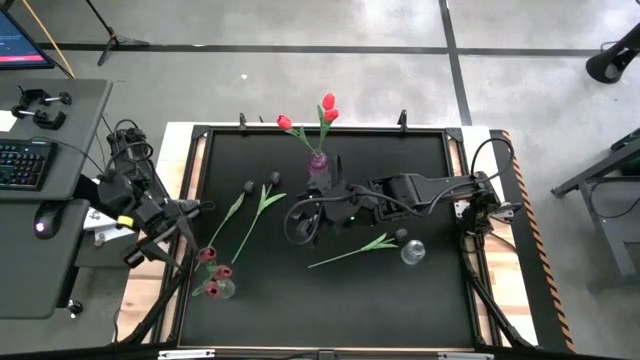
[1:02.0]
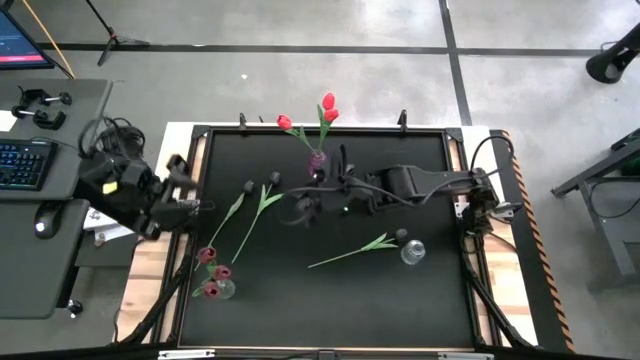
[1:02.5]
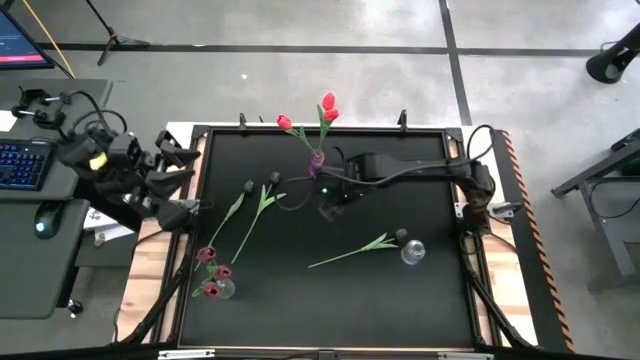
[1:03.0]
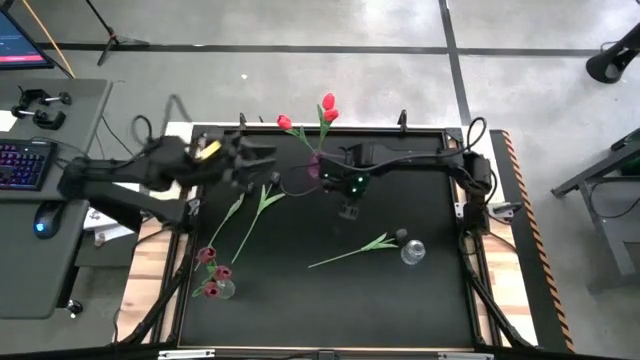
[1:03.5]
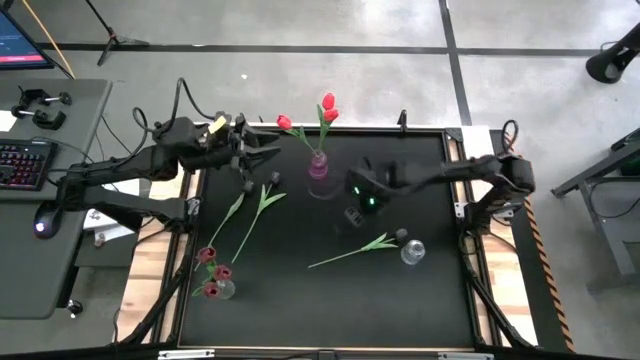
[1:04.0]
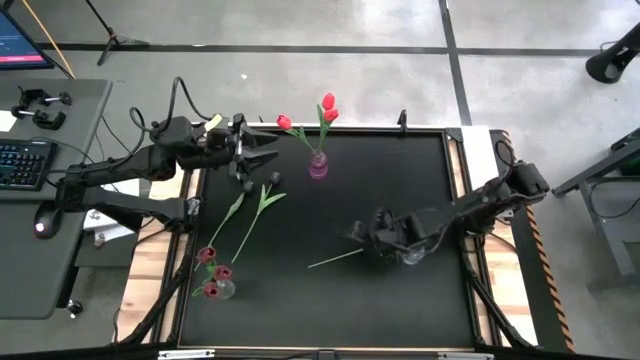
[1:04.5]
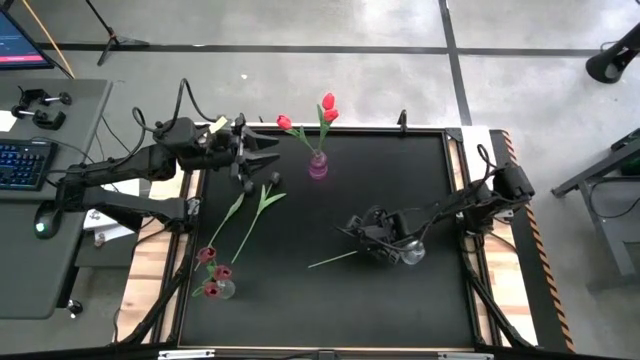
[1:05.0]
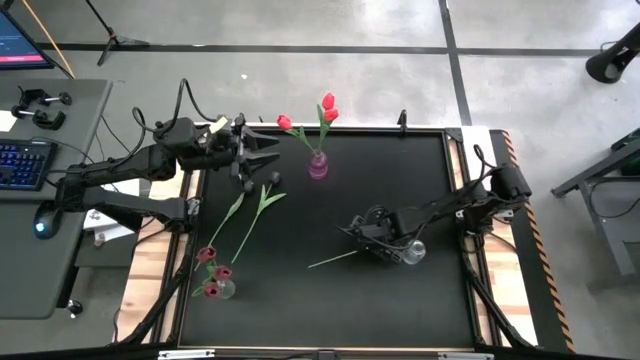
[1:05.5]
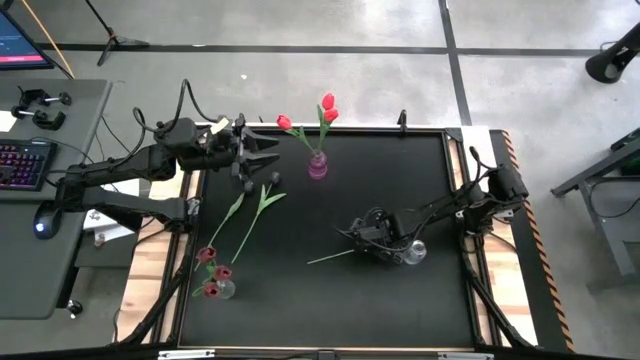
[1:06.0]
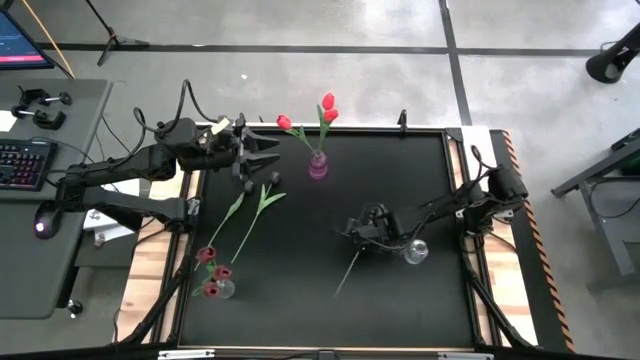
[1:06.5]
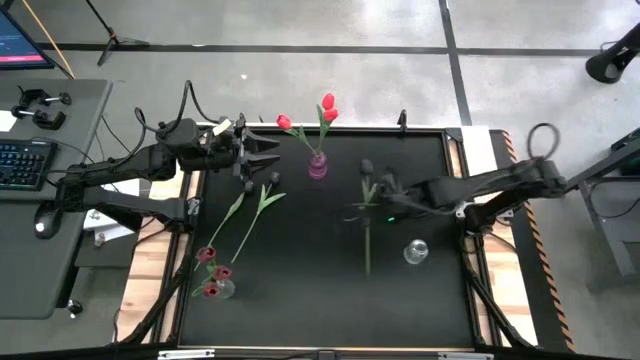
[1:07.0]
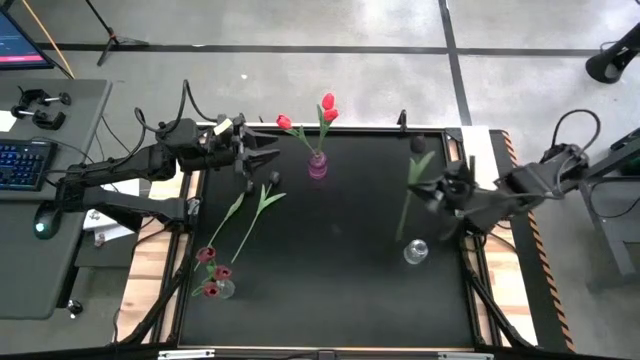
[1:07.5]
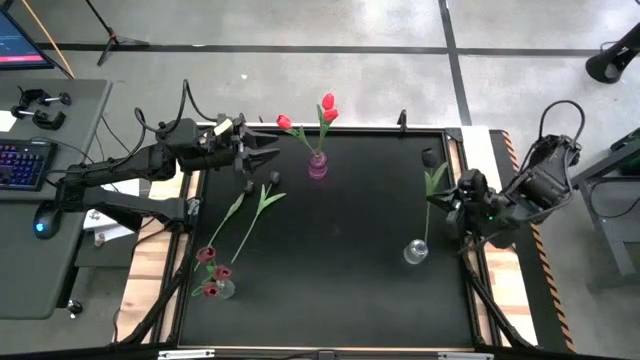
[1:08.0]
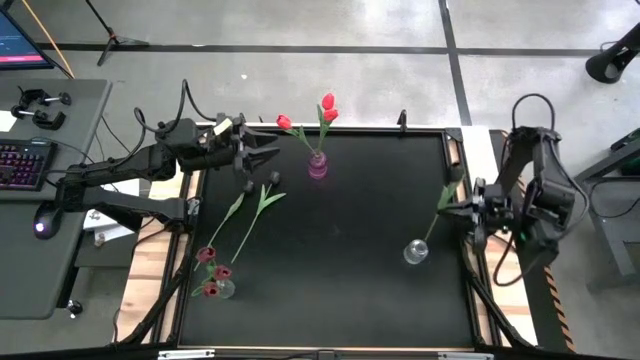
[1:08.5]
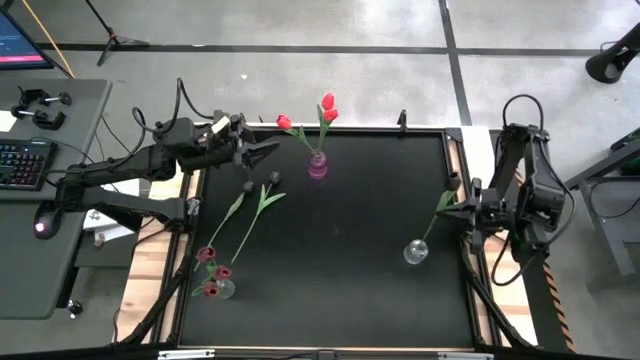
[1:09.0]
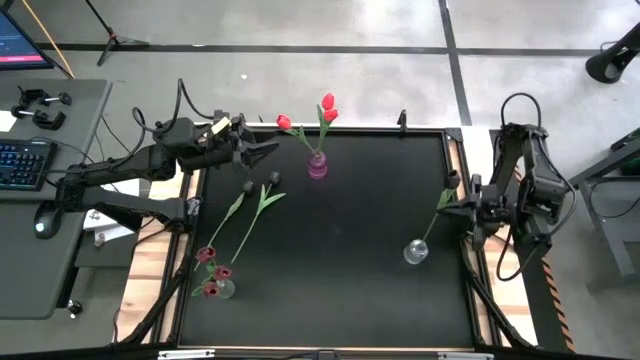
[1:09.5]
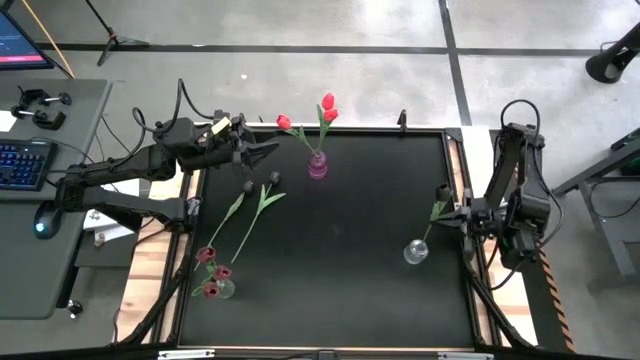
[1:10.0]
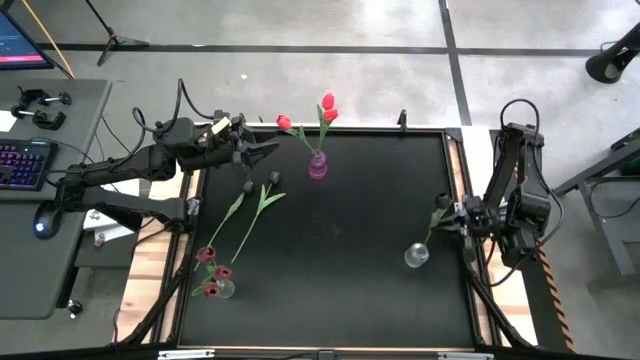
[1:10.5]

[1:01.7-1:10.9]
Task: Sort flowers into vase by color
Put the right black tulip into the right transparent vase

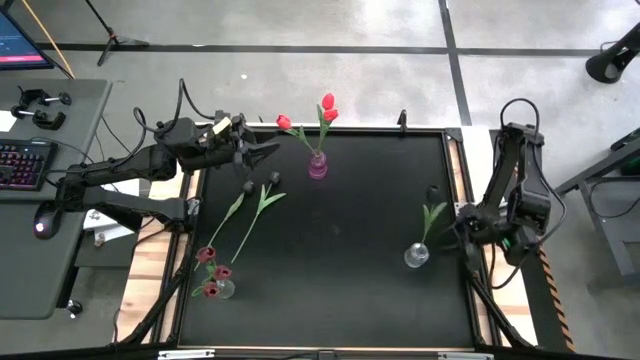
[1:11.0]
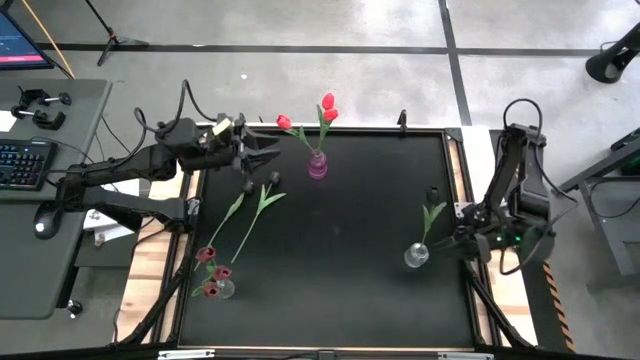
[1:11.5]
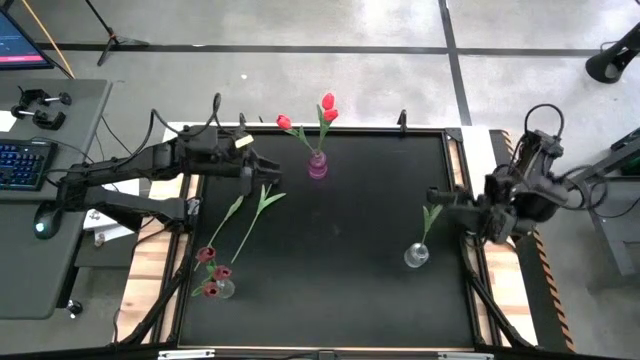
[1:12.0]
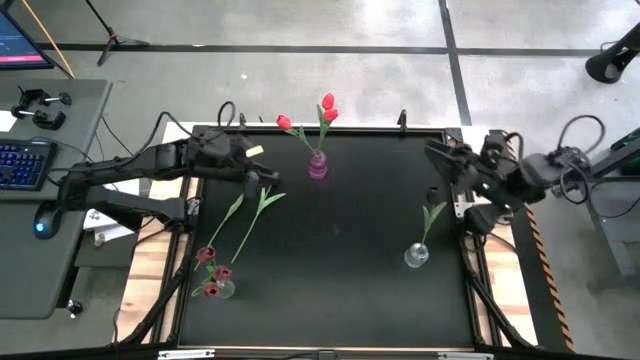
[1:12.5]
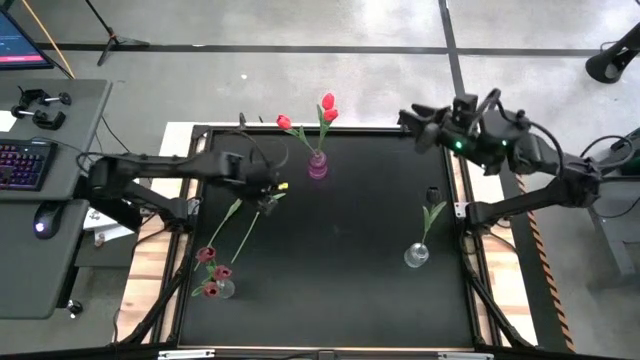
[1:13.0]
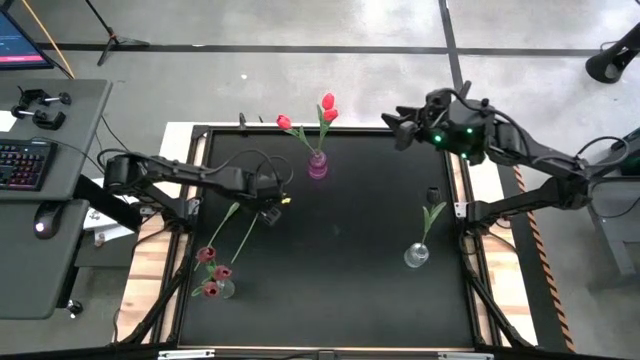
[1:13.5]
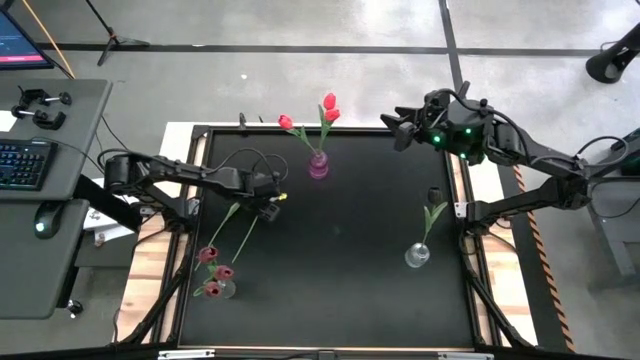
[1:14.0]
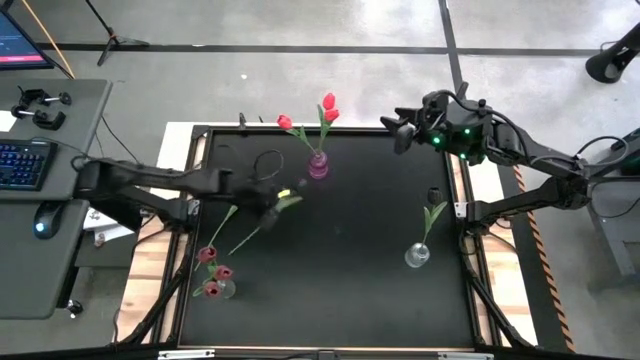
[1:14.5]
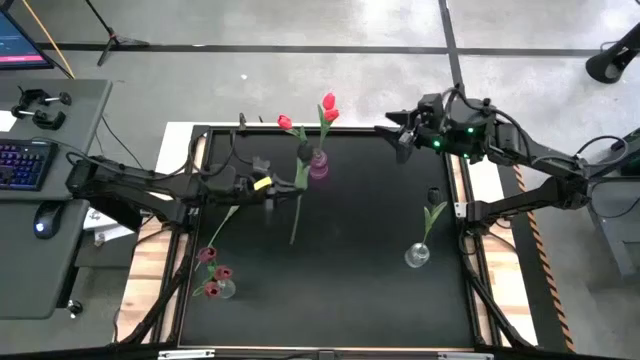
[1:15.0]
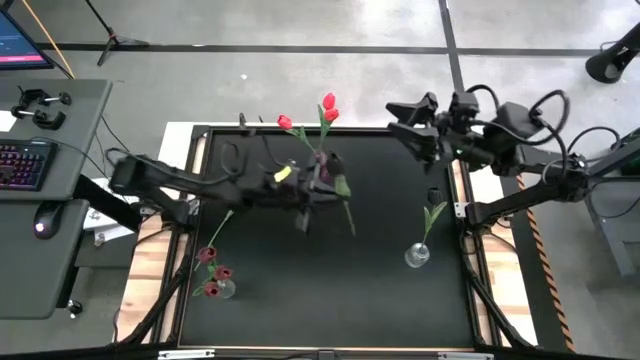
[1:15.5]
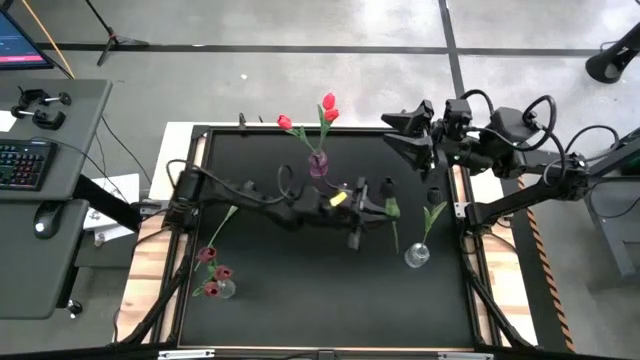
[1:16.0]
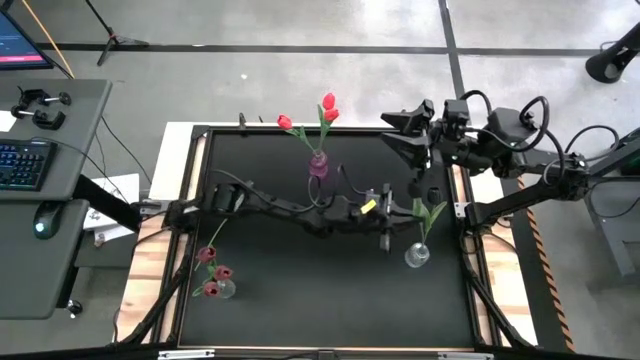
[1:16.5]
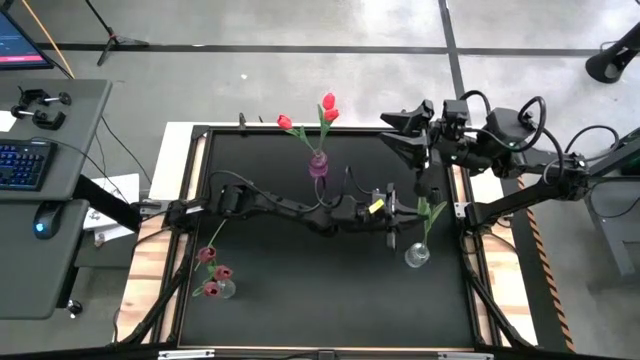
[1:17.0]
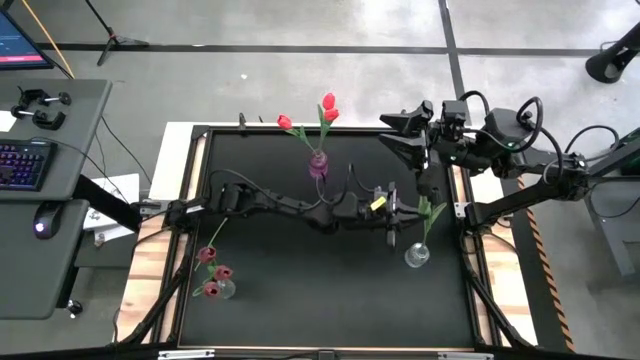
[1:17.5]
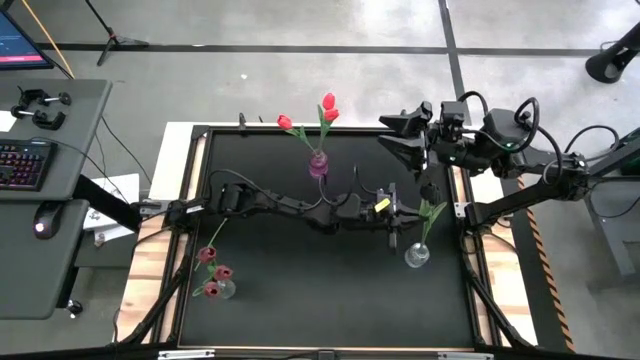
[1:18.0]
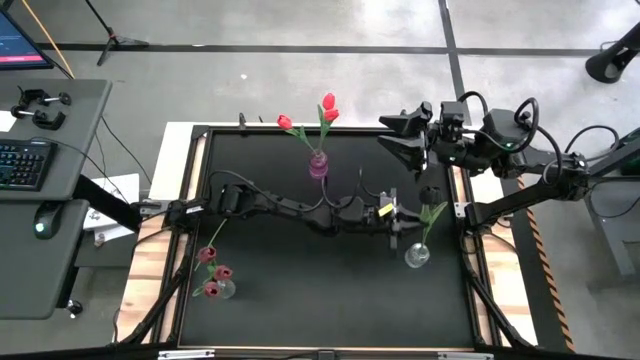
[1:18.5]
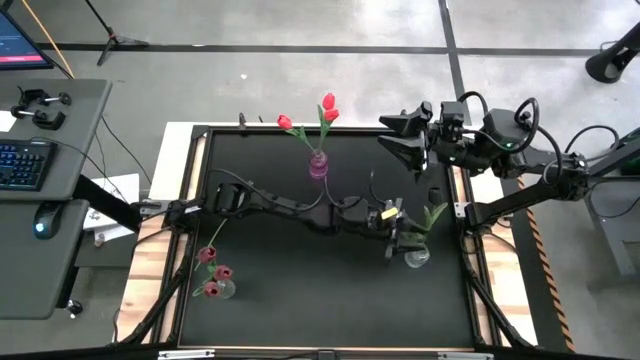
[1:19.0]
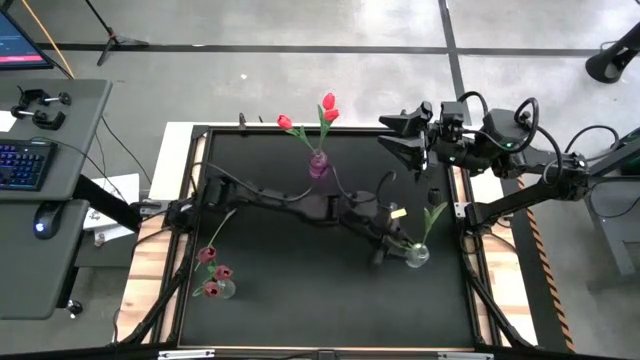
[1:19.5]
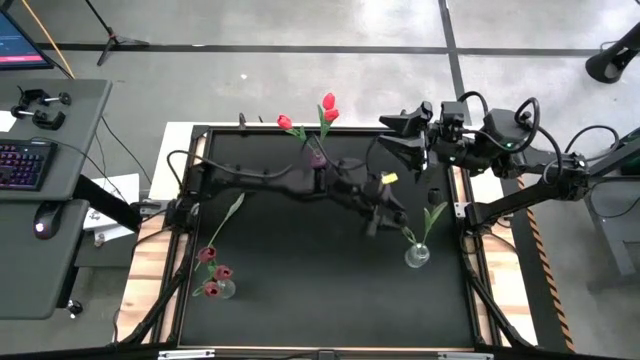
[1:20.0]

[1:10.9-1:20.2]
Put the right black tulip into the right transparent vase

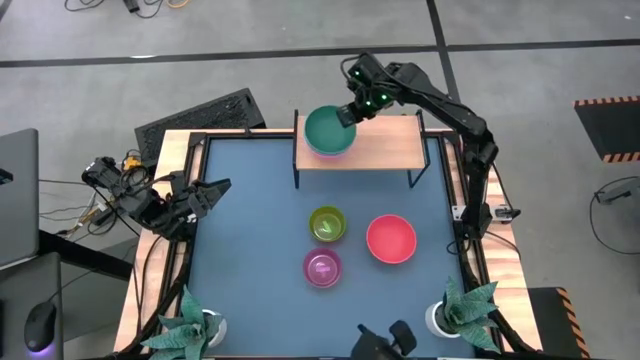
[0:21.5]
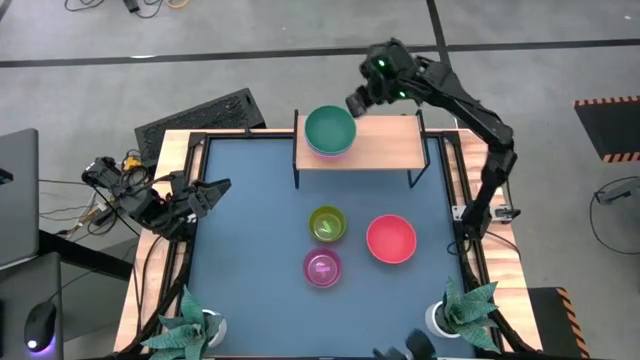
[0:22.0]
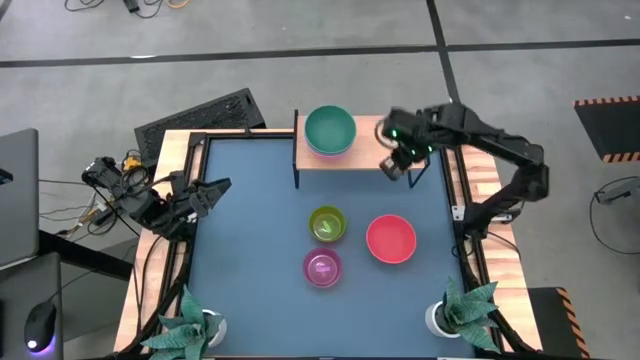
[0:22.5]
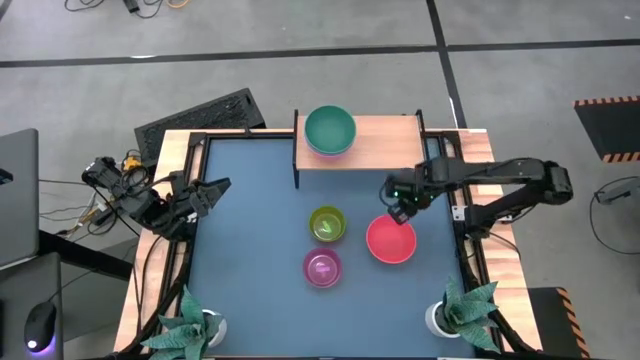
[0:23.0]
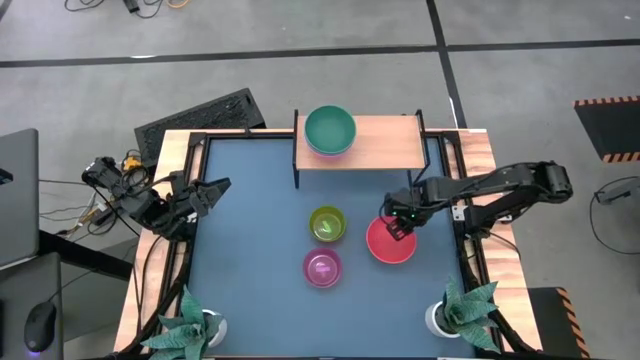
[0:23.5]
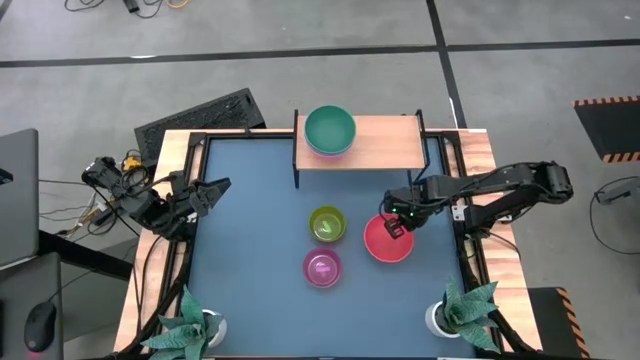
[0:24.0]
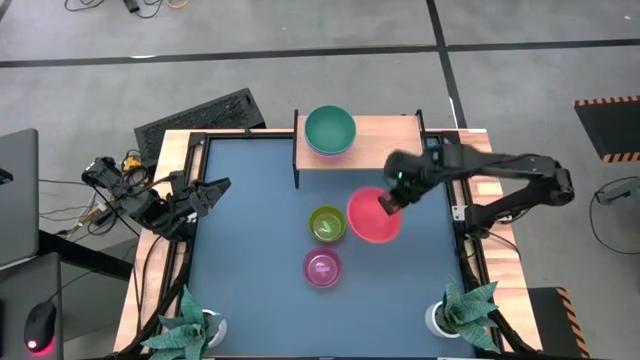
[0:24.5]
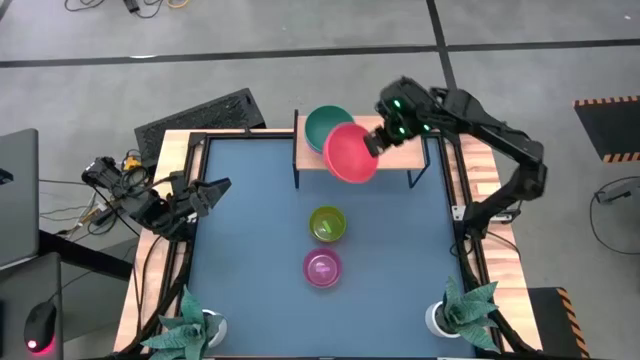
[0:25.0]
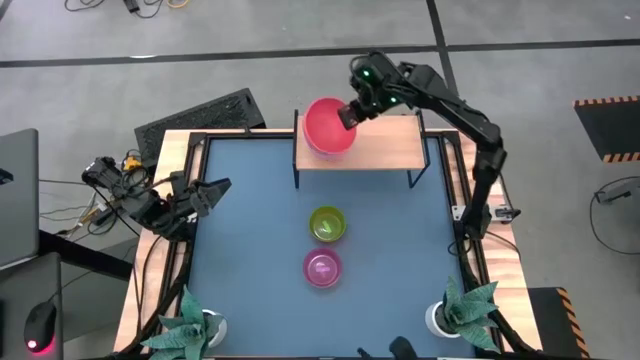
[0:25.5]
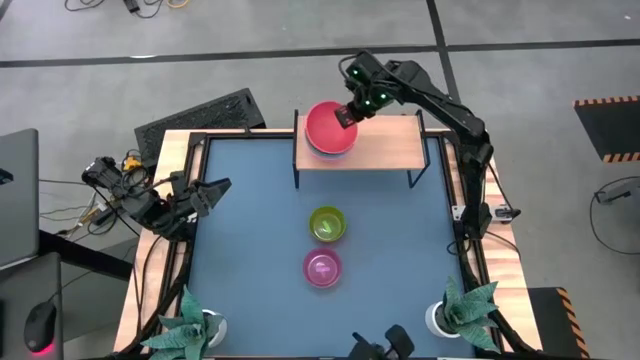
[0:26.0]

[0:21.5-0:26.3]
Task: Place and stack bowls onto a shelf
Stack the large orange bowl on the large green bowl on the shelf
